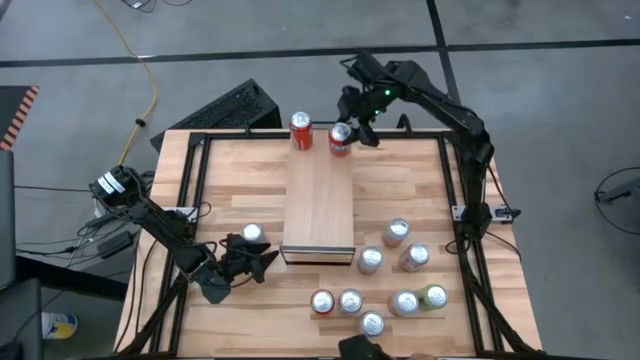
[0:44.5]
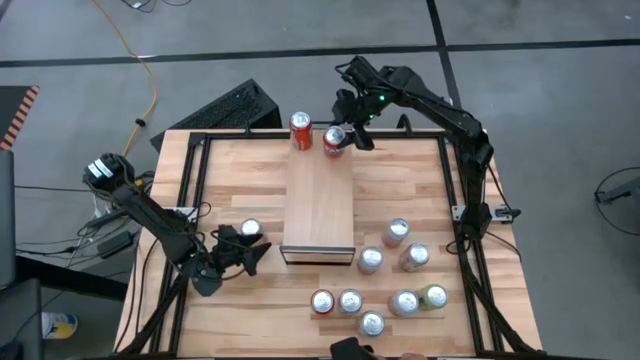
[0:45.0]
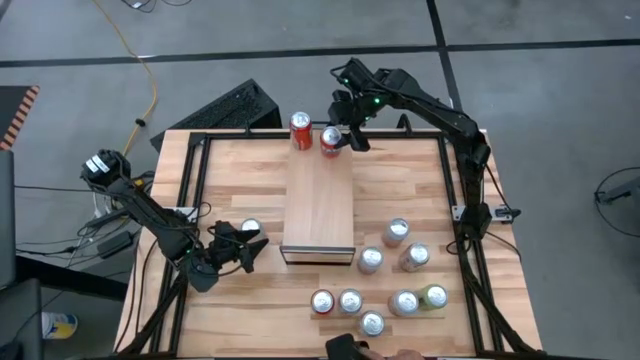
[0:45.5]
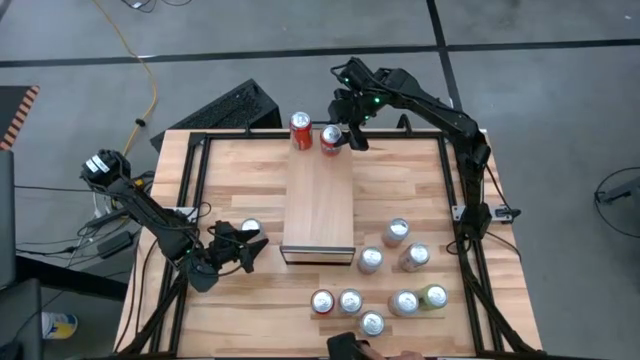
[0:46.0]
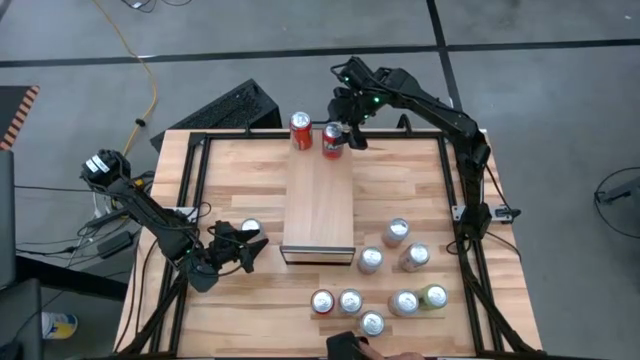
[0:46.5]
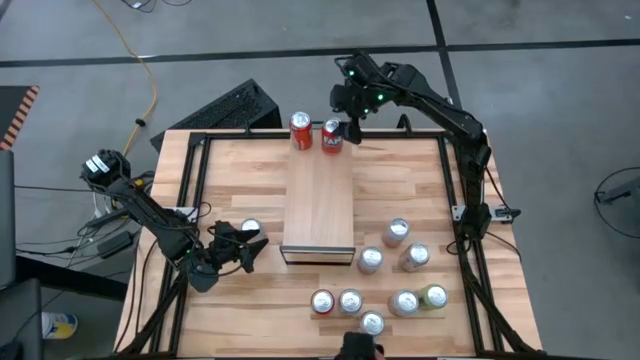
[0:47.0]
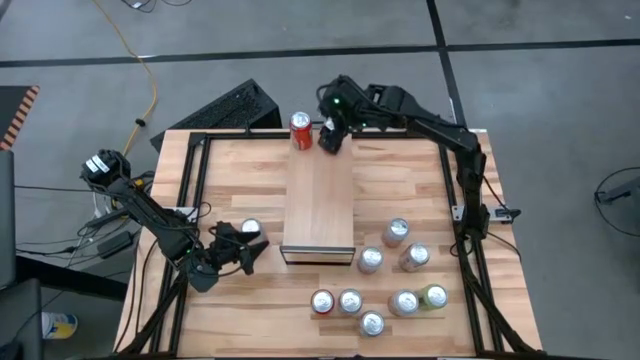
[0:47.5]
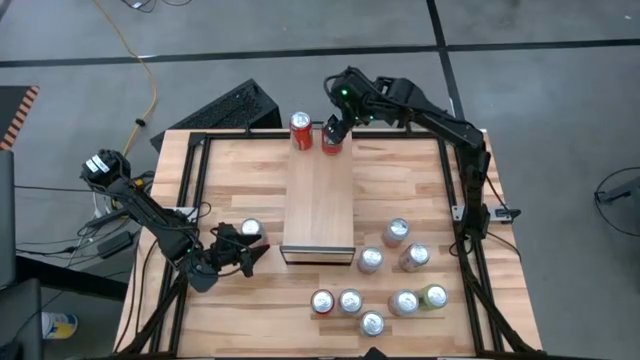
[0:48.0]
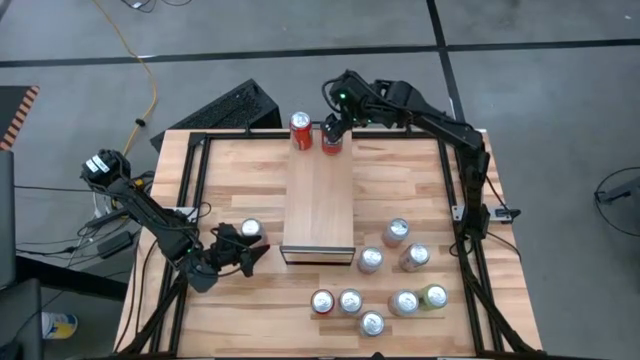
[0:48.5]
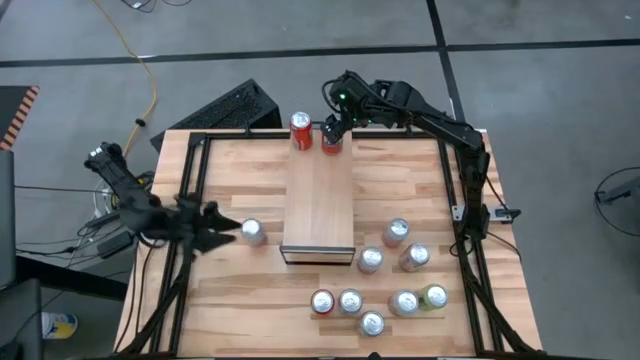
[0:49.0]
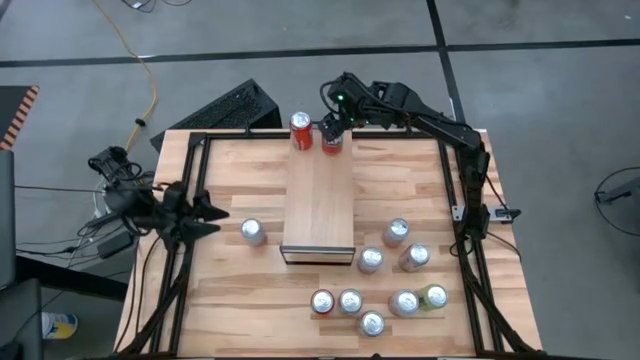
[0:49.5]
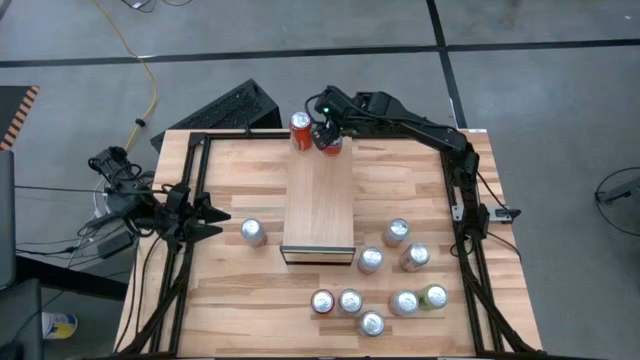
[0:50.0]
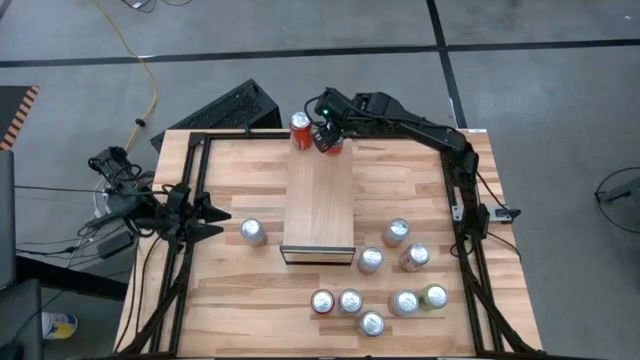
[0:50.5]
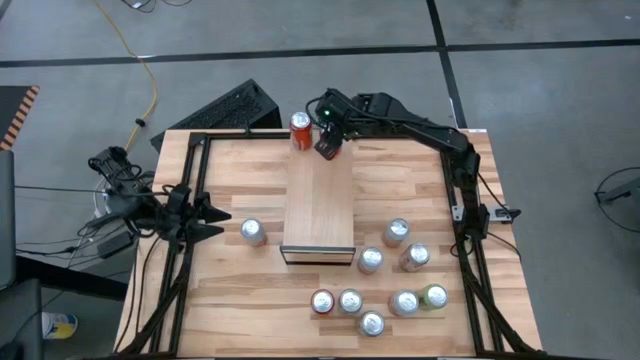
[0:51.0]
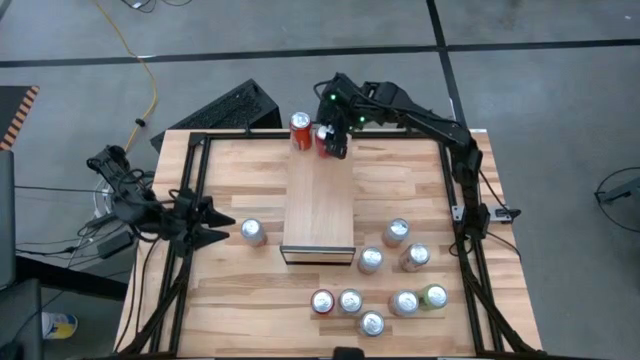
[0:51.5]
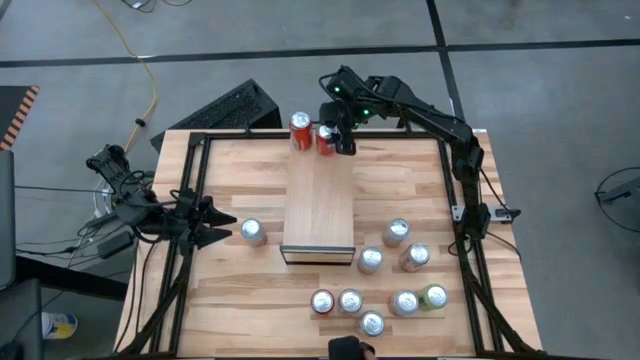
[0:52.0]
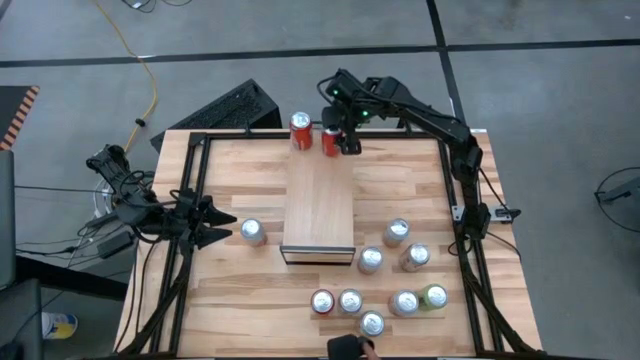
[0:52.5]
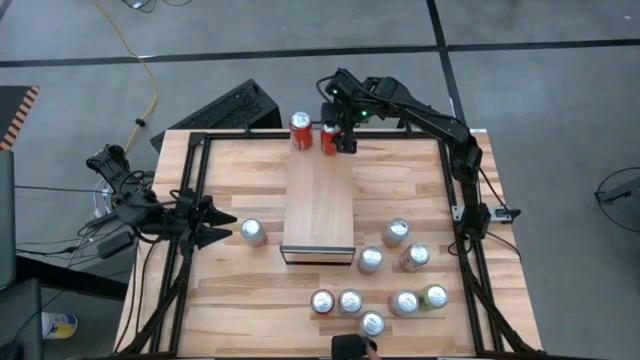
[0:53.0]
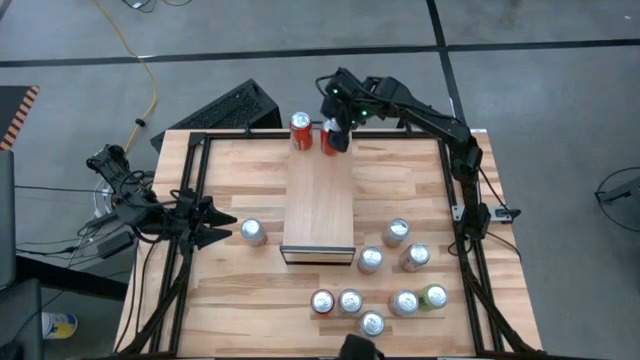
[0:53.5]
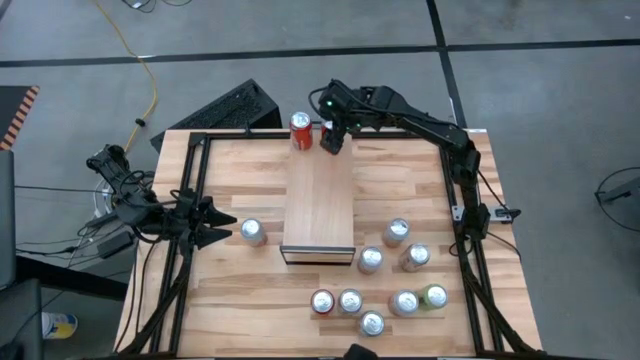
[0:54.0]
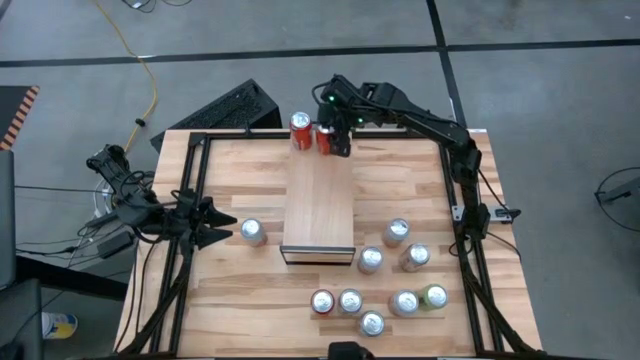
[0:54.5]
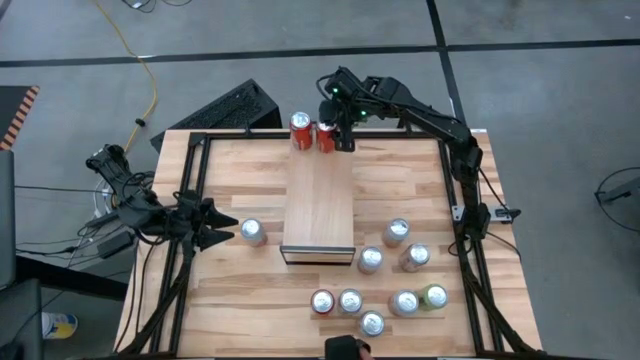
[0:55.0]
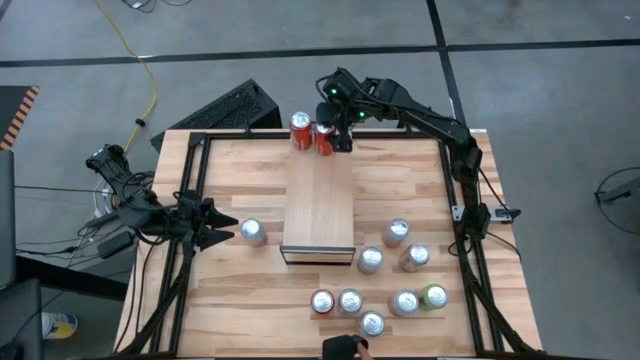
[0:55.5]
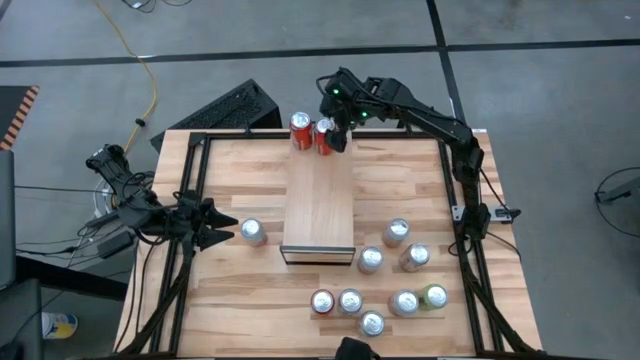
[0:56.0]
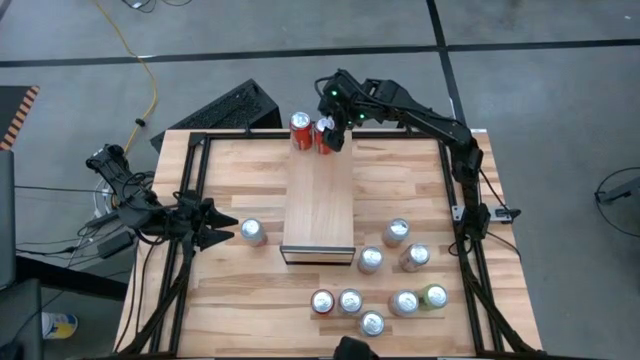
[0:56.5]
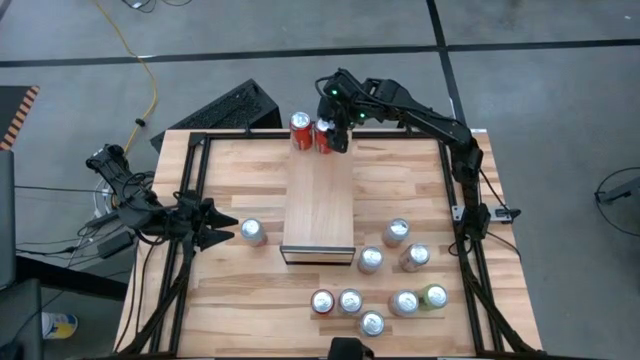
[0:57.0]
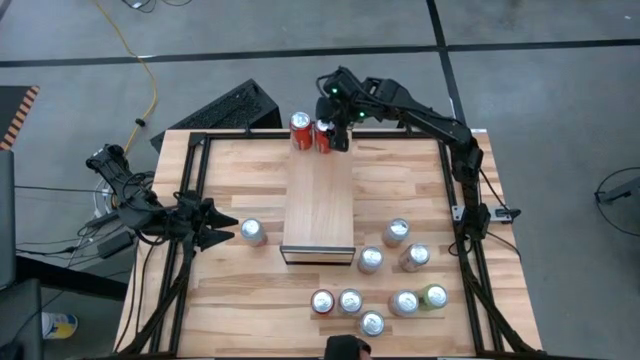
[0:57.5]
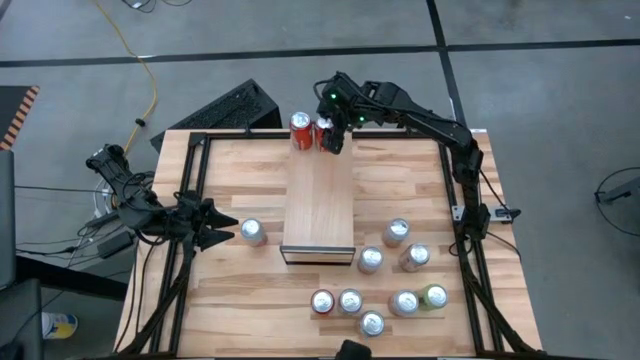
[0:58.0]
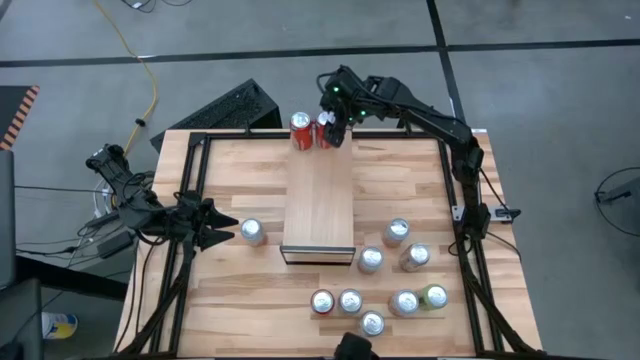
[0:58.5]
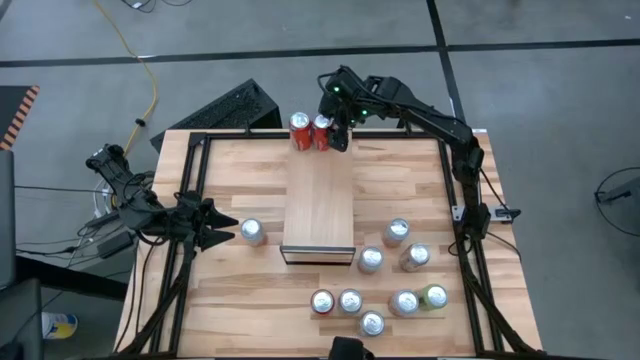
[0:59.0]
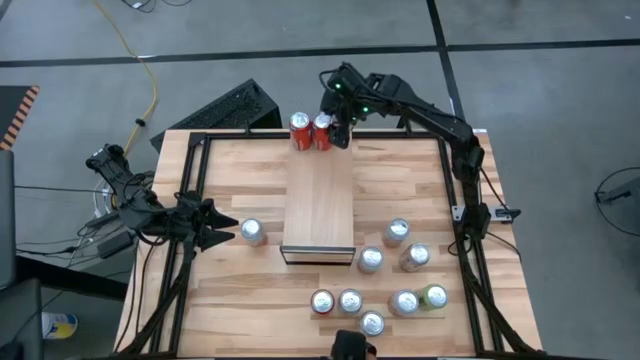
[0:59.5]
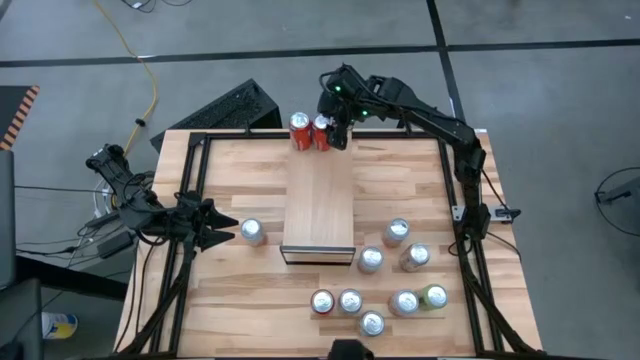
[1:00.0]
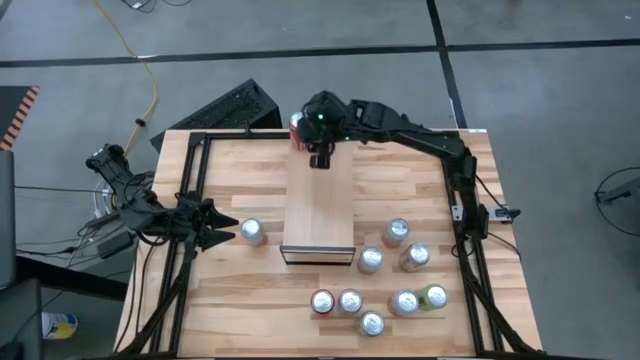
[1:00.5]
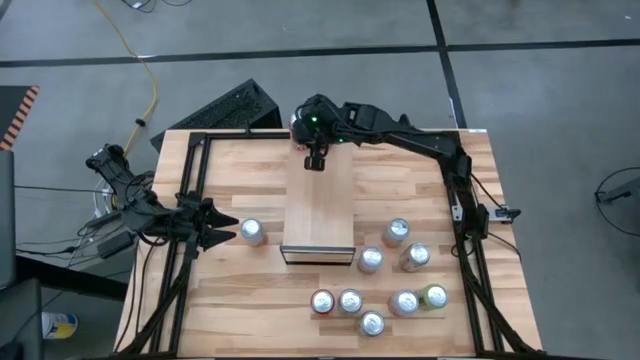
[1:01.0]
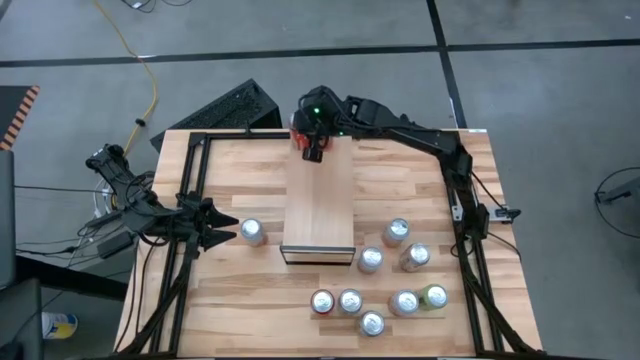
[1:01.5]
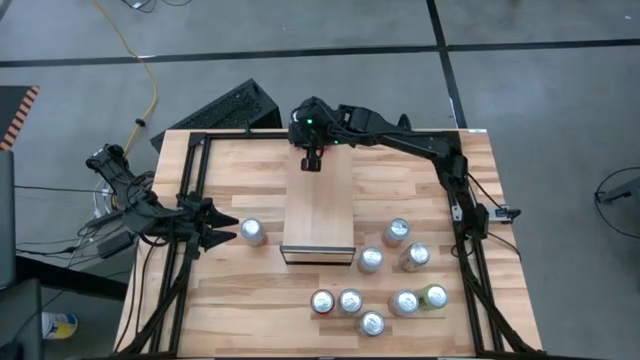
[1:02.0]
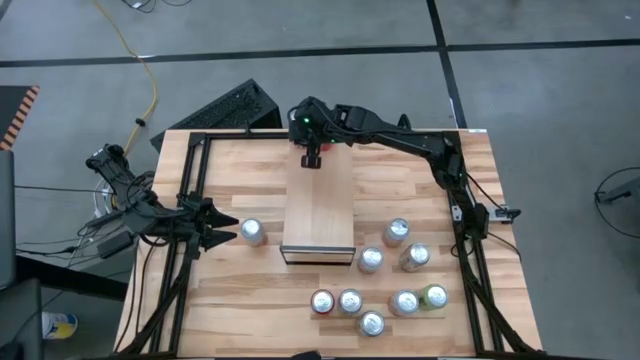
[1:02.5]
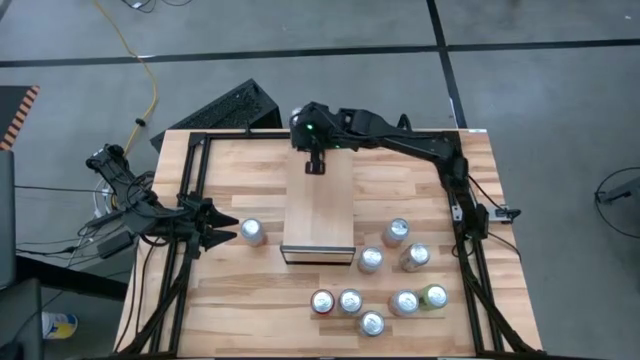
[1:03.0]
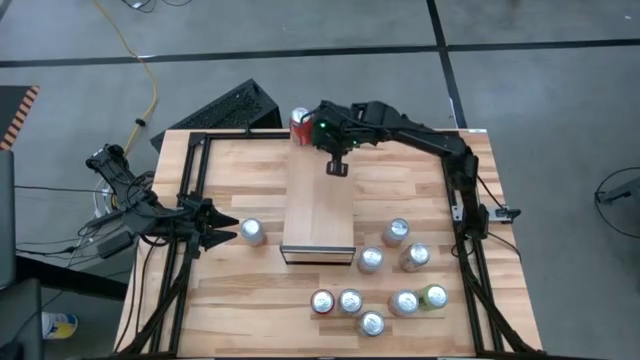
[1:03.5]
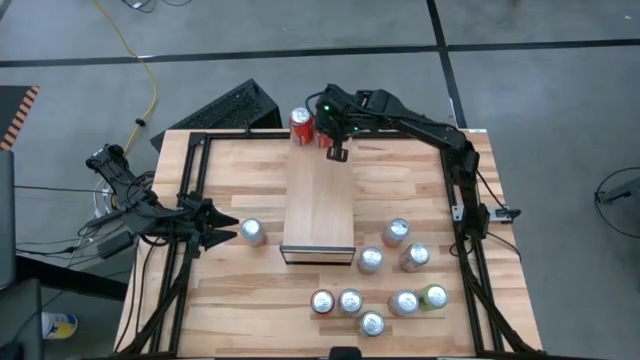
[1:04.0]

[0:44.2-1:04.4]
Task: Place canned beverage on shelf
Put the left red soda can on the shelf aligned with the other red soda can

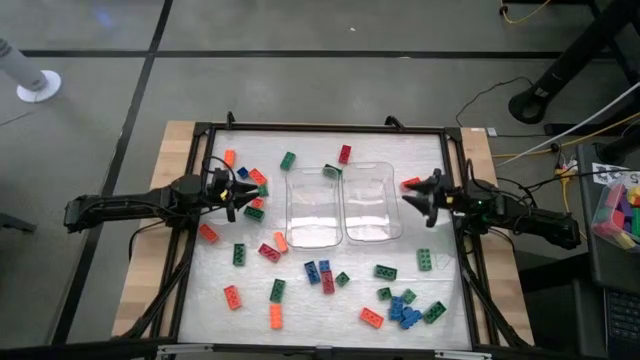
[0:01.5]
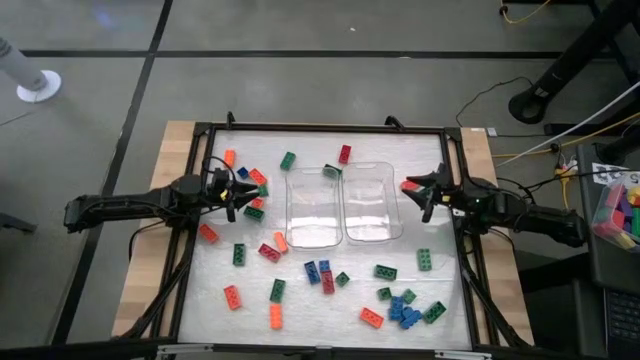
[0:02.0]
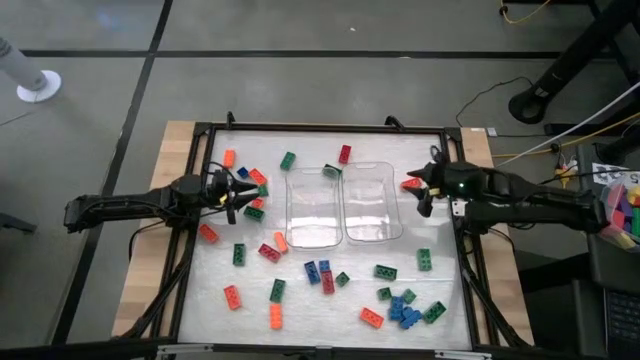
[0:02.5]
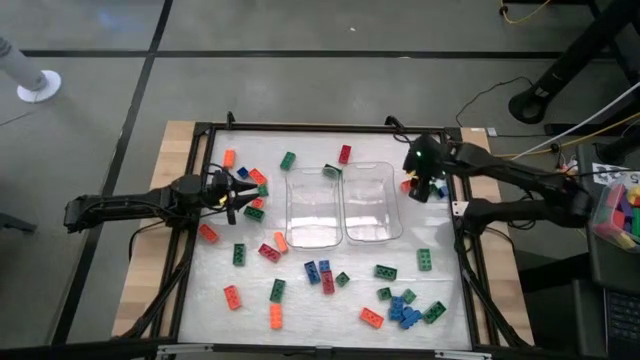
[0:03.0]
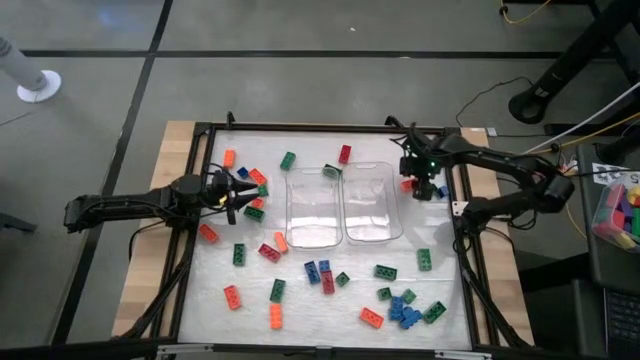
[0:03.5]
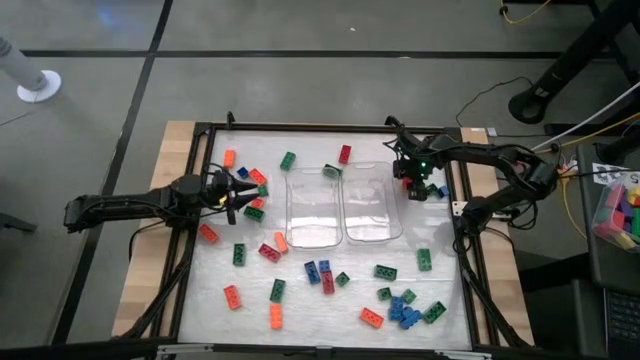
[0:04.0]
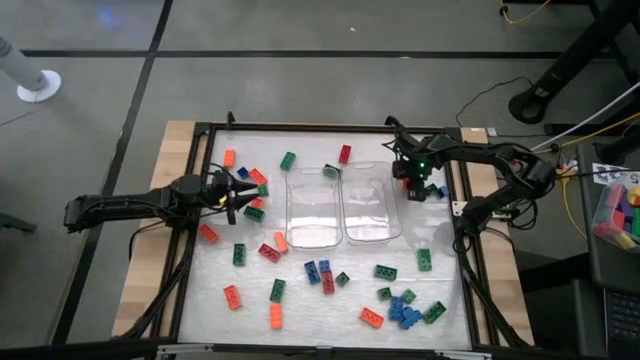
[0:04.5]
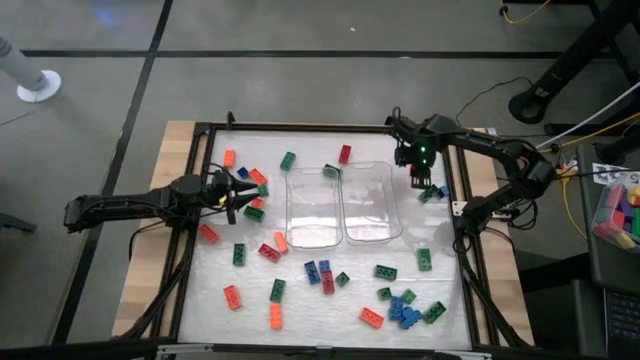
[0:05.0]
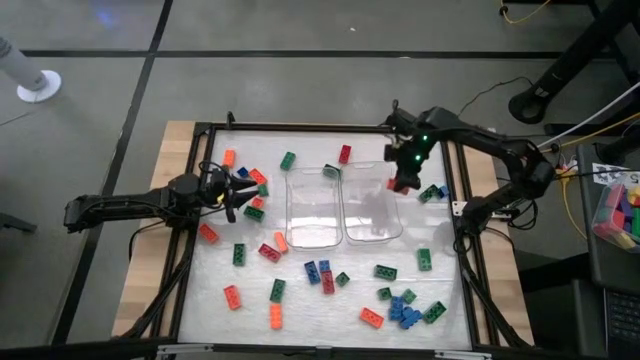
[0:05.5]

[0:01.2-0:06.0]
Task: Sort blocks by size
Put the orange rectangular game piece into the right transparent bin
